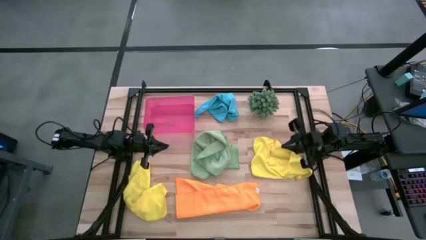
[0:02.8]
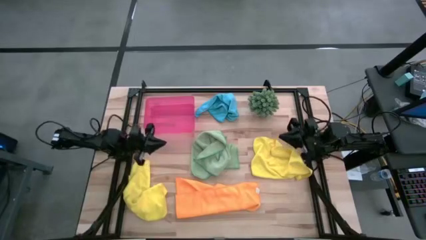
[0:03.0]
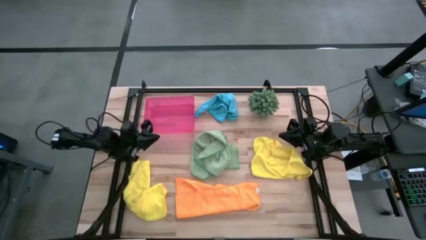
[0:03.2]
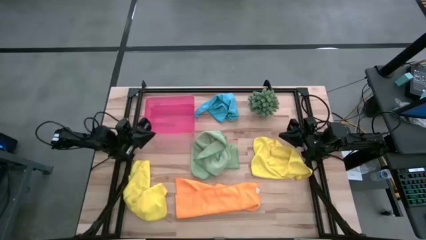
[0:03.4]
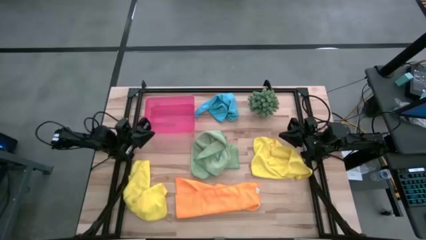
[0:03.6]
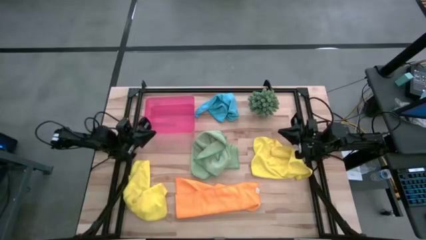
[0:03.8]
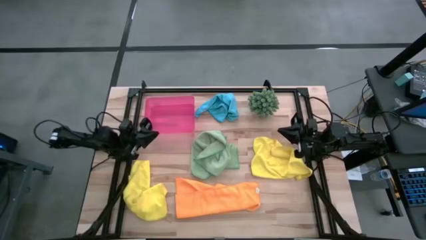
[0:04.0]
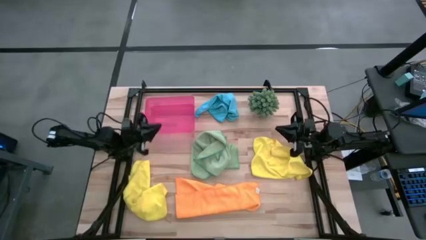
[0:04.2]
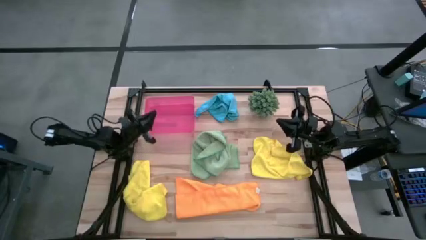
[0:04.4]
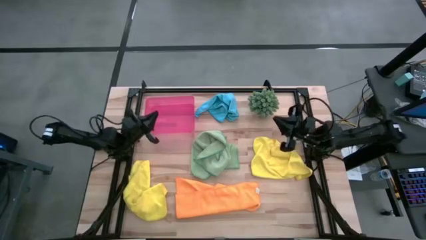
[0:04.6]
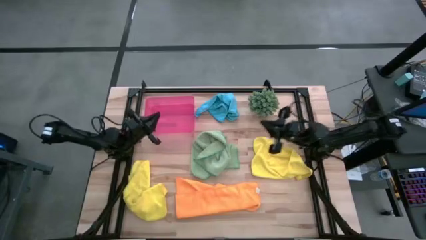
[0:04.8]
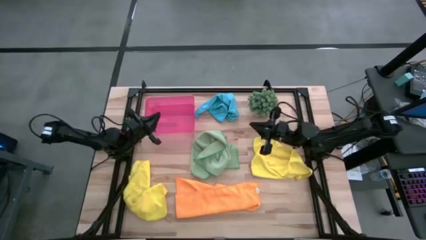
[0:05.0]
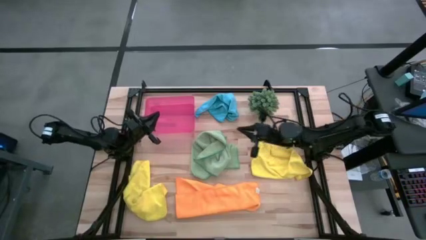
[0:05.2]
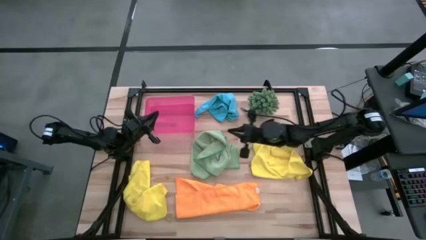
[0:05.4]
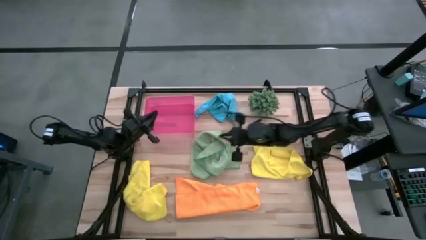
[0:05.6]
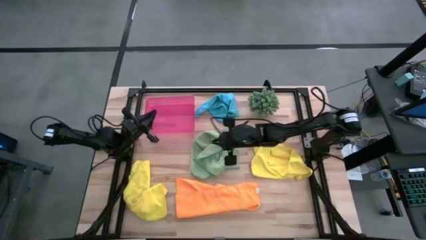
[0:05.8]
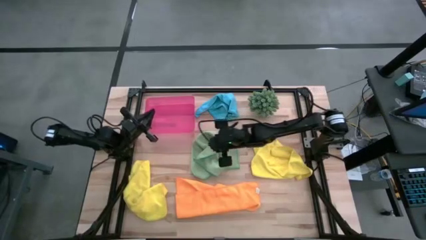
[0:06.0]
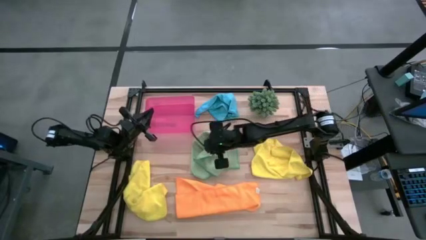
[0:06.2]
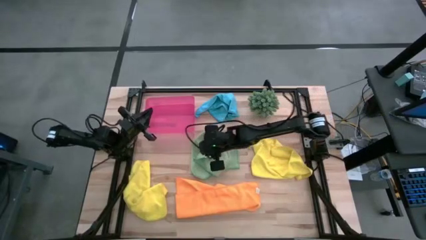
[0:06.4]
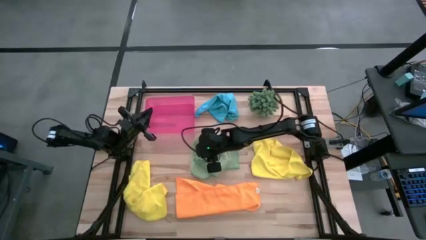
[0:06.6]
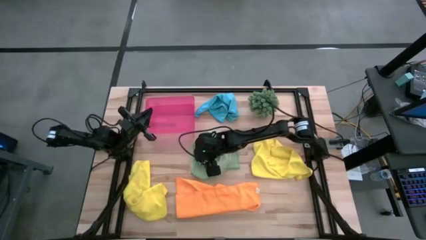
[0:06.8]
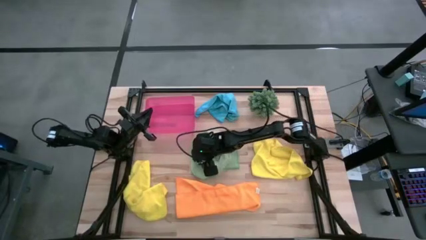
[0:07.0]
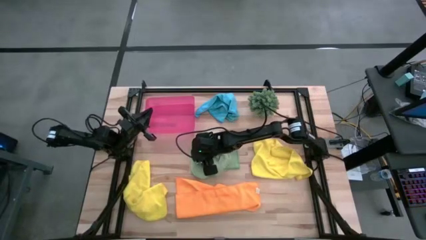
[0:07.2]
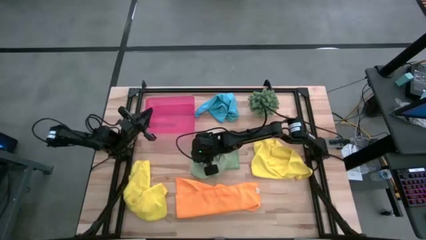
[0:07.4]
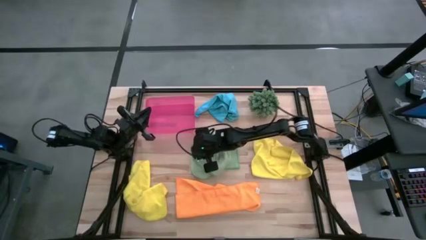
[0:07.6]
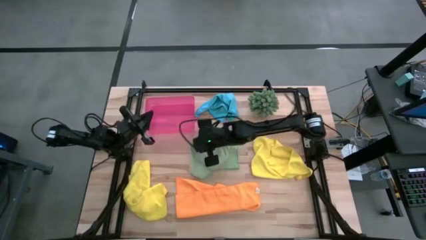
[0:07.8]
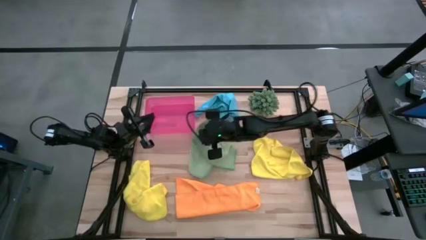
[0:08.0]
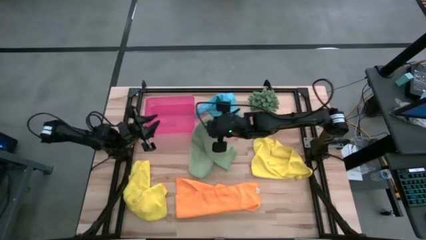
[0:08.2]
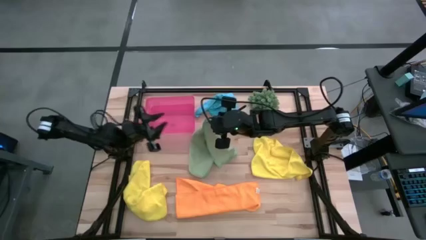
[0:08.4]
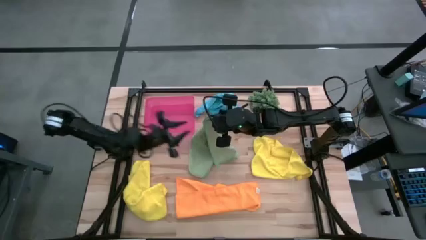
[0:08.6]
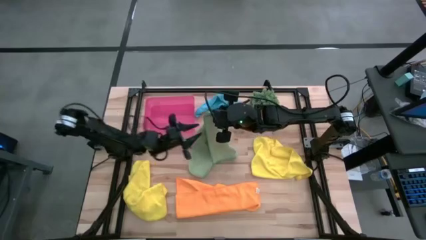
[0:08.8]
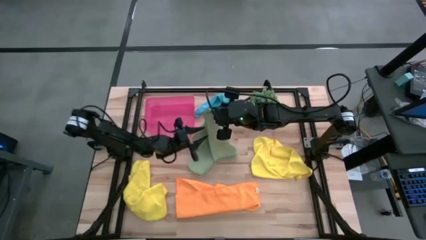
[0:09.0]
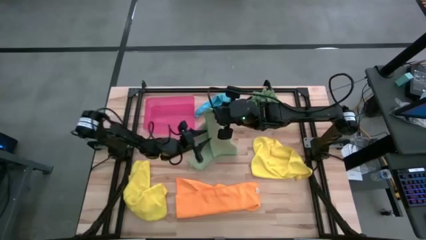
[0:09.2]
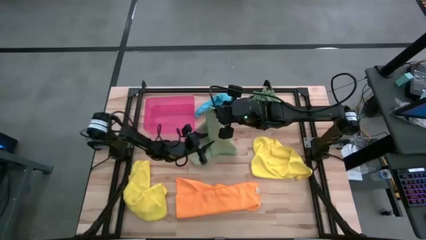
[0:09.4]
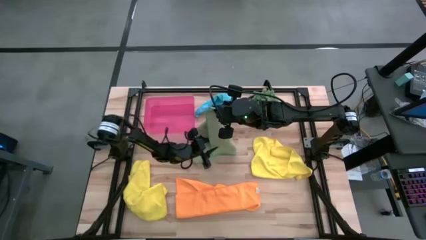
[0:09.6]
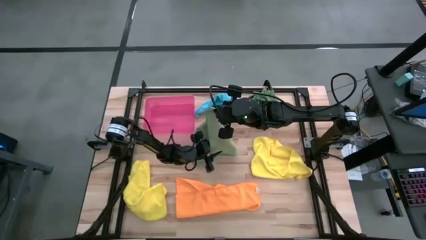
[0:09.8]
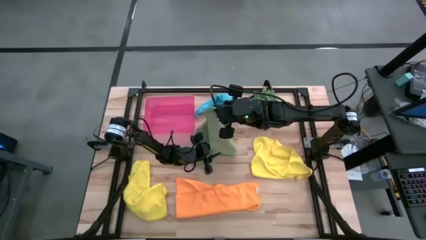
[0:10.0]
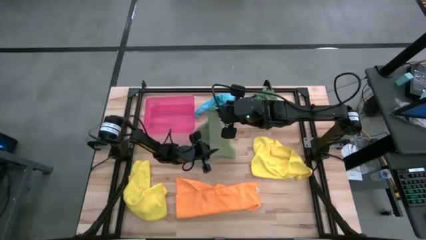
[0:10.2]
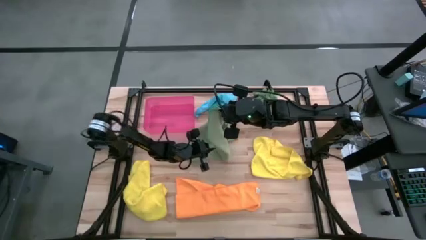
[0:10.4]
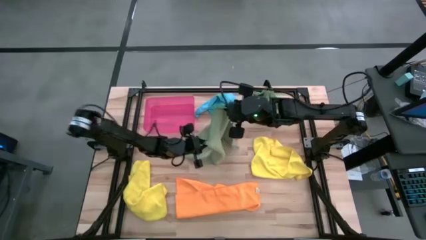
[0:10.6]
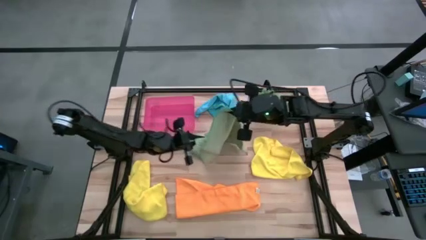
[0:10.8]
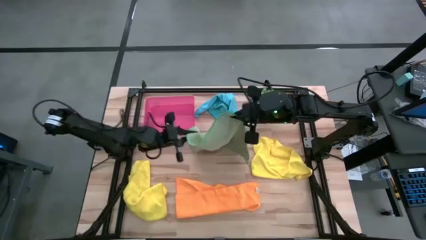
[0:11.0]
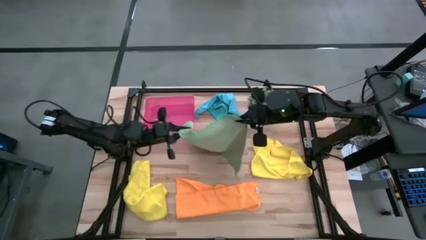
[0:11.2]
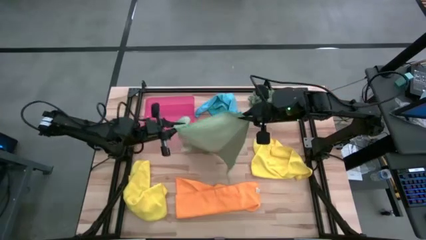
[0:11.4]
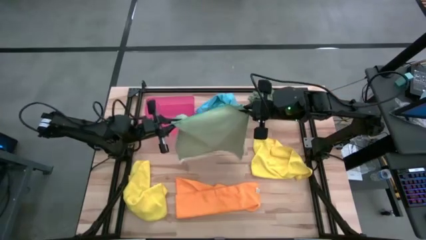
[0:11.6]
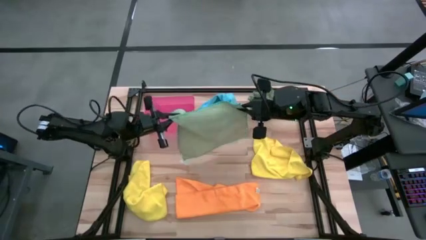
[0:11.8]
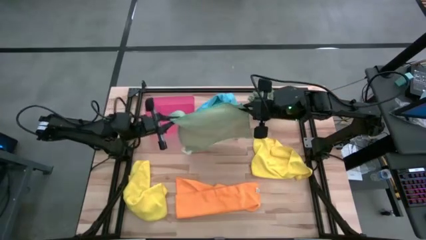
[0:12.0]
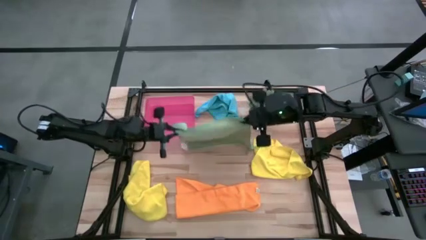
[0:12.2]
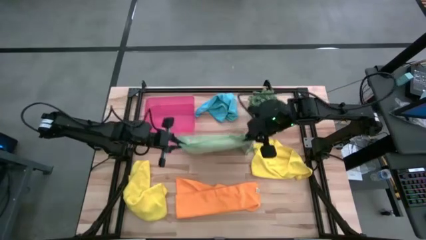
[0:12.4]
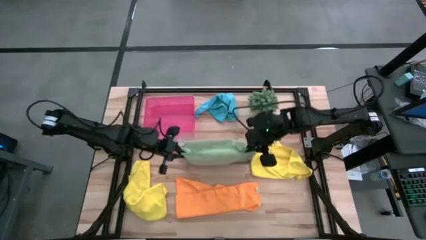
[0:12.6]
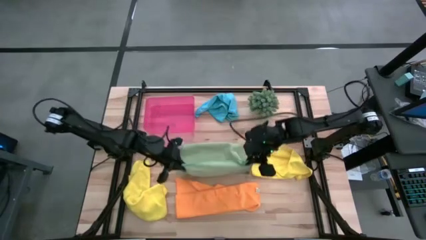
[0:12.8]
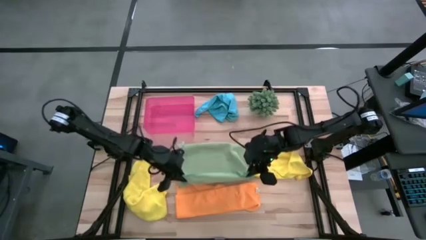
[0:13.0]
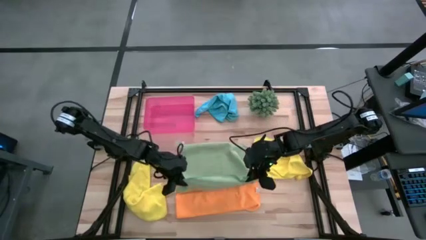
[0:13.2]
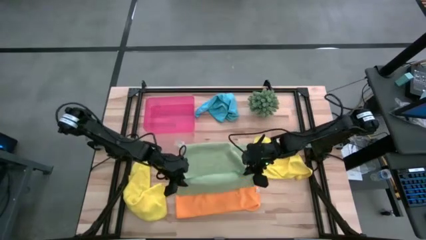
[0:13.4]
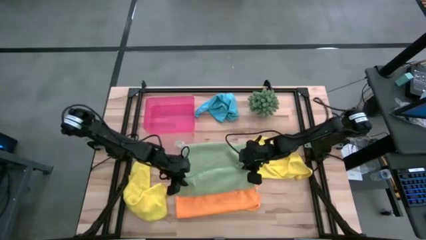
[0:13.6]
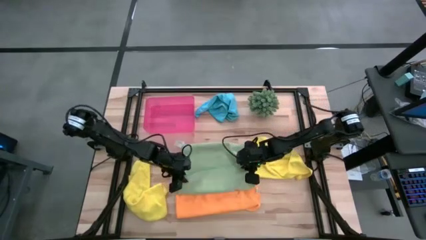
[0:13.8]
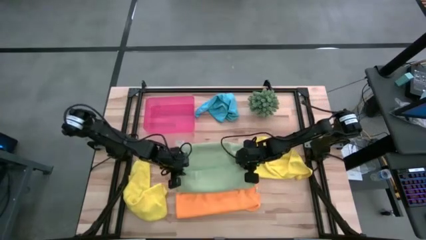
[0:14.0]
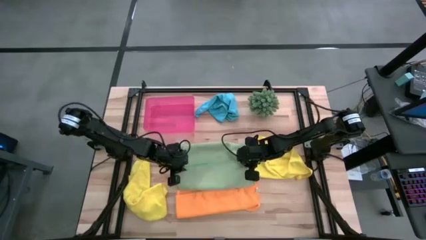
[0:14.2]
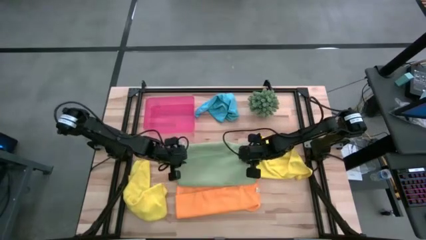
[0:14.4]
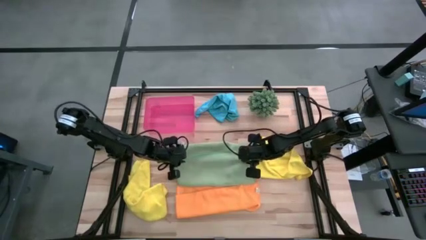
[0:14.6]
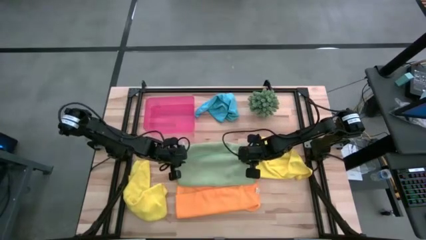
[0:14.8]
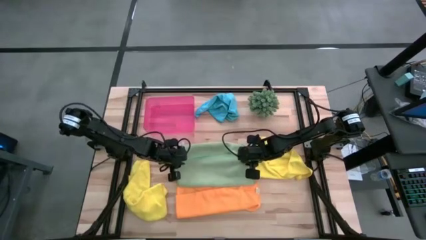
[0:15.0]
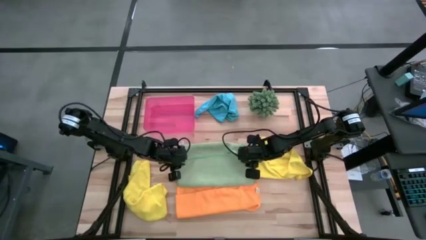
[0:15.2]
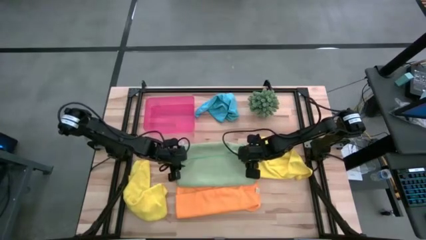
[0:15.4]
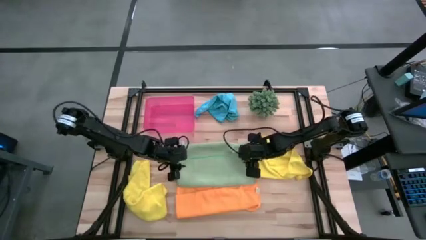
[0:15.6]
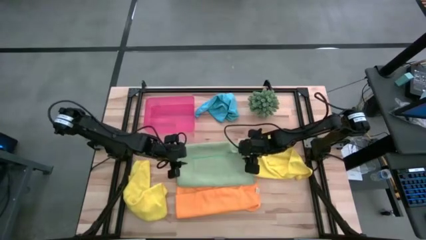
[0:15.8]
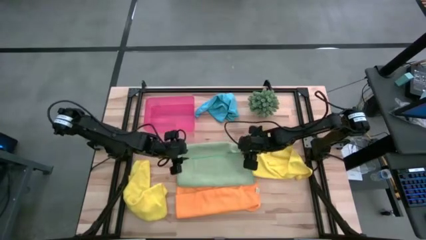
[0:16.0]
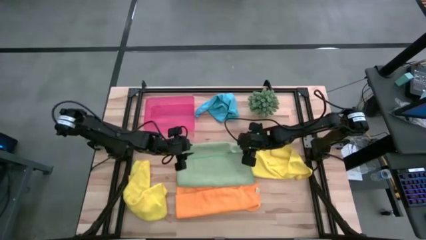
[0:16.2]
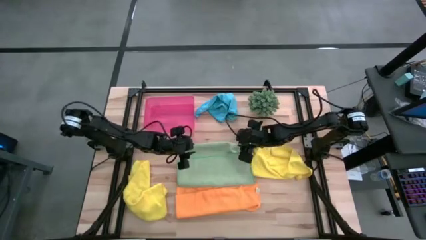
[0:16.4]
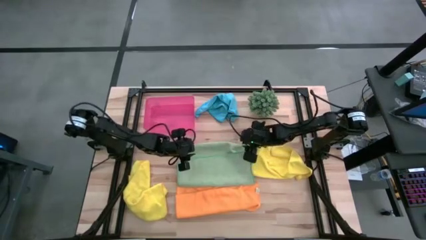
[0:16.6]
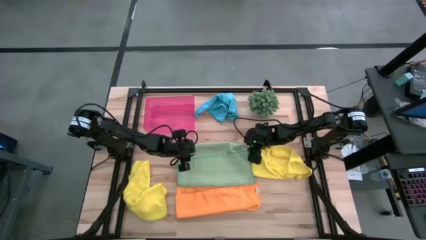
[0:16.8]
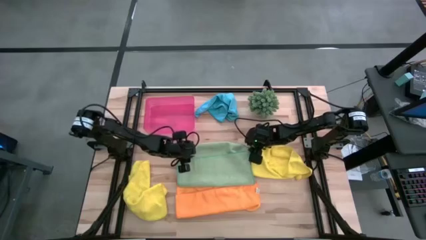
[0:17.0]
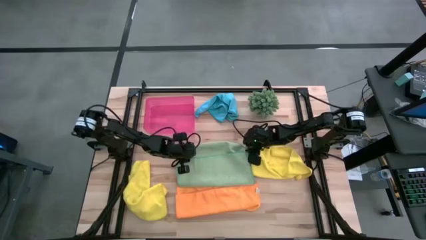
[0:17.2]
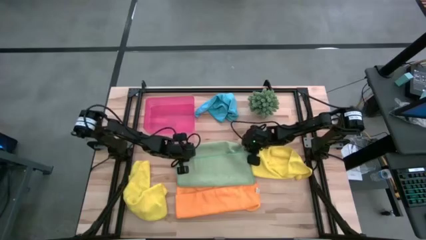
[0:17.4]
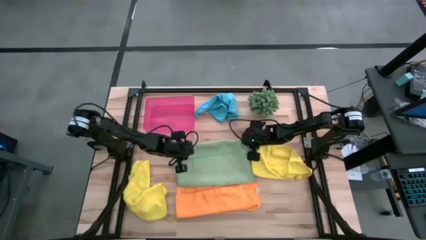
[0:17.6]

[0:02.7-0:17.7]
Task: Fold microfiber towels
Fold the green towel
